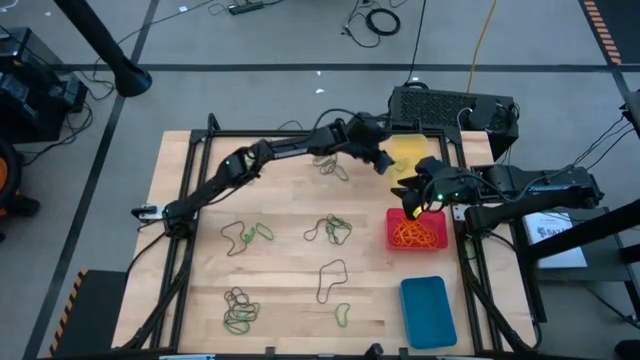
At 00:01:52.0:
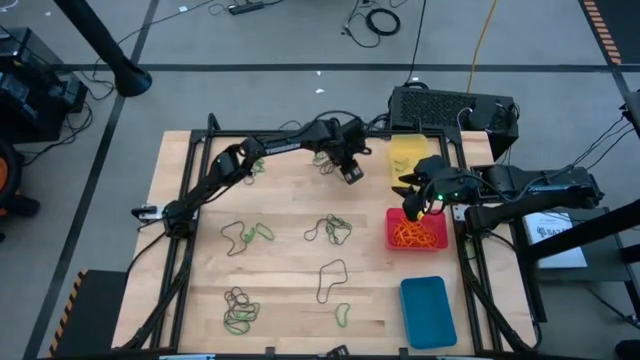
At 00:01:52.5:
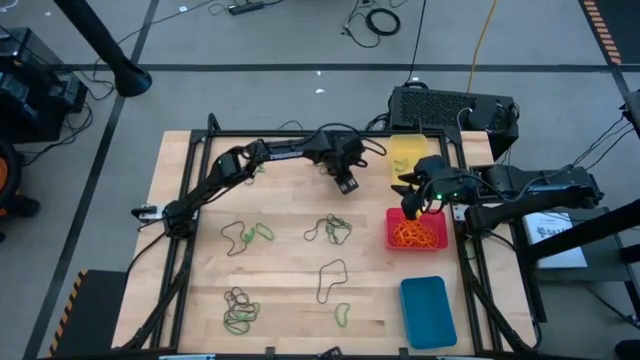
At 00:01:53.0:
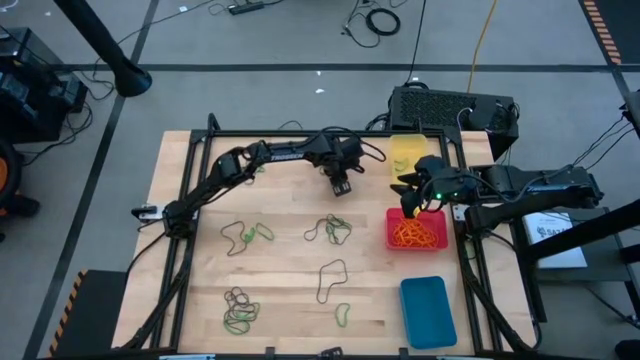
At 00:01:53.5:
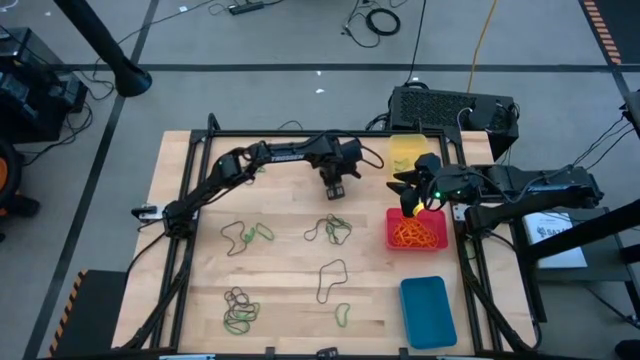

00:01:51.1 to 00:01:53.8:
Task: Sort rubber bands into baskets
Put the green rubber band into the yellow bin

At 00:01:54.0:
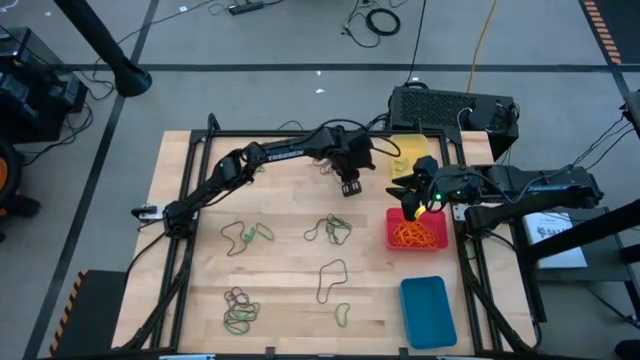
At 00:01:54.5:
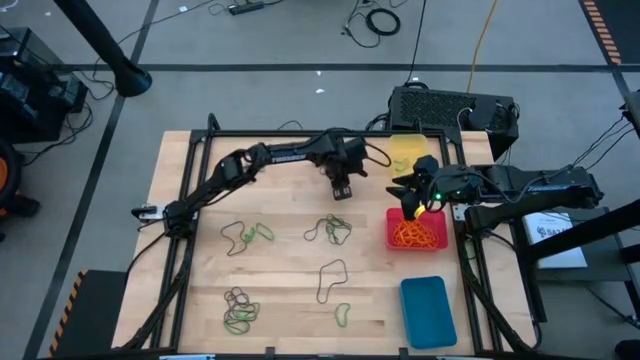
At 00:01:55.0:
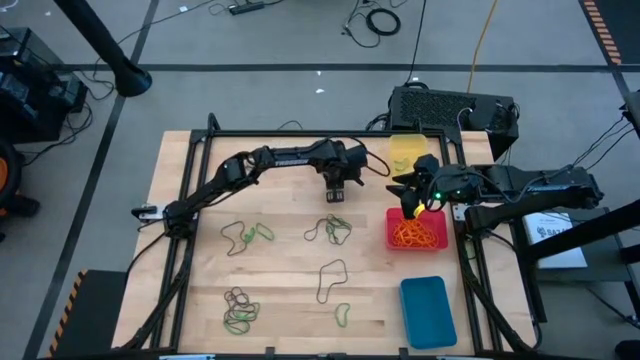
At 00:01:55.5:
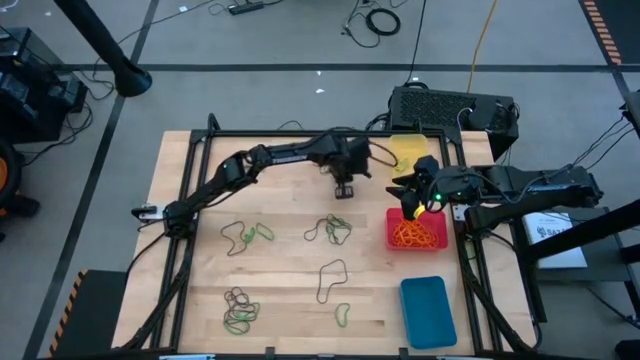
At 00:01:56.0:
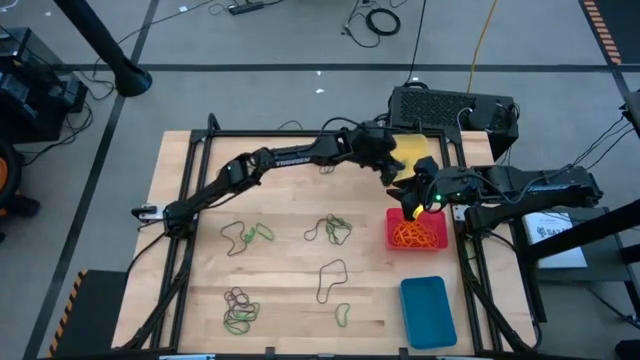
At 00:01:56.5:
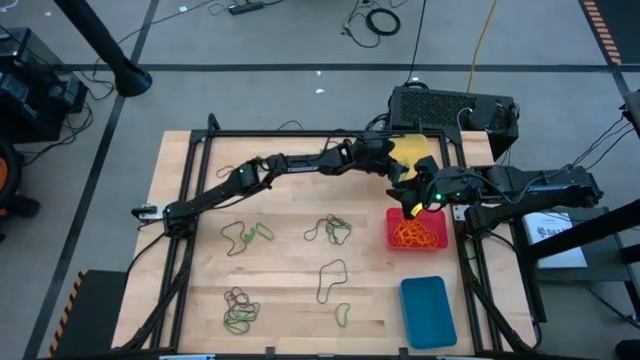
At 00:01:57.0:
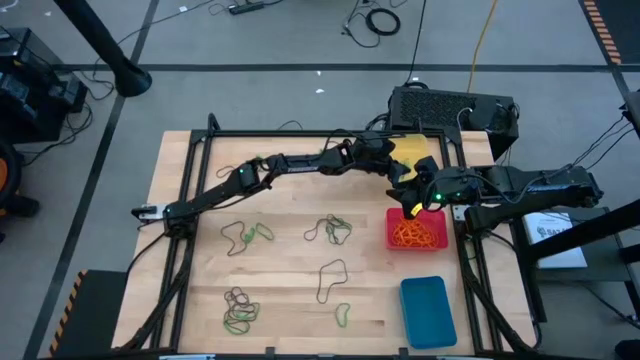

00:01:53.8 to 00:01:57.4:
Put the green rubber band into the yellow bin

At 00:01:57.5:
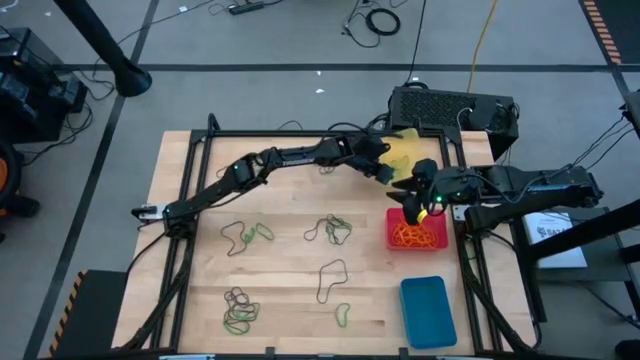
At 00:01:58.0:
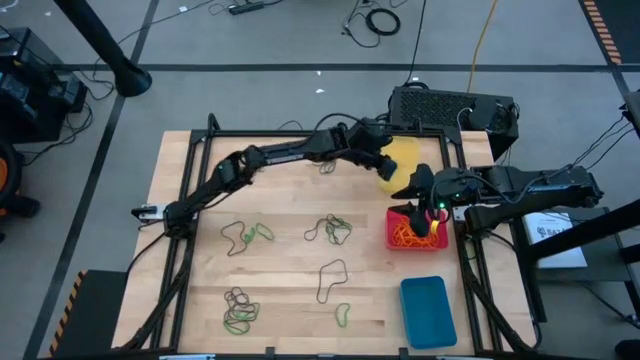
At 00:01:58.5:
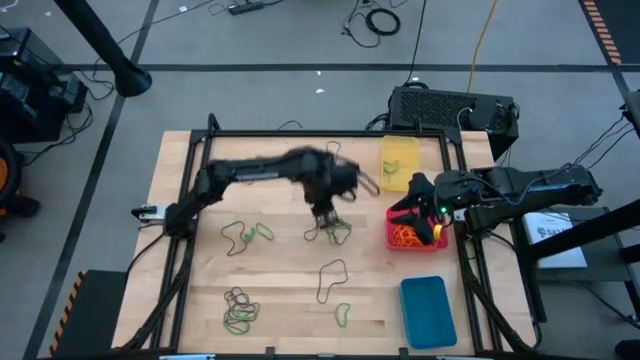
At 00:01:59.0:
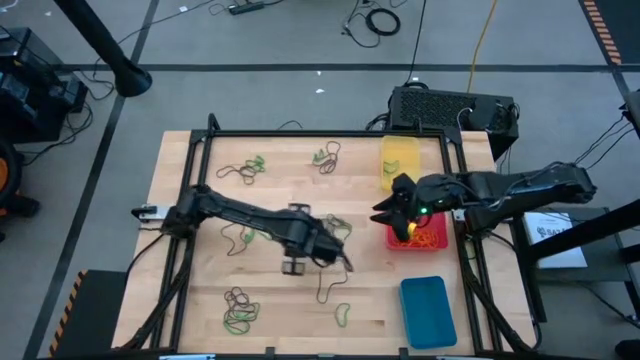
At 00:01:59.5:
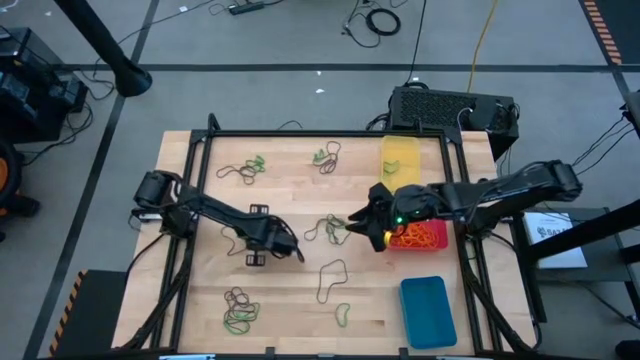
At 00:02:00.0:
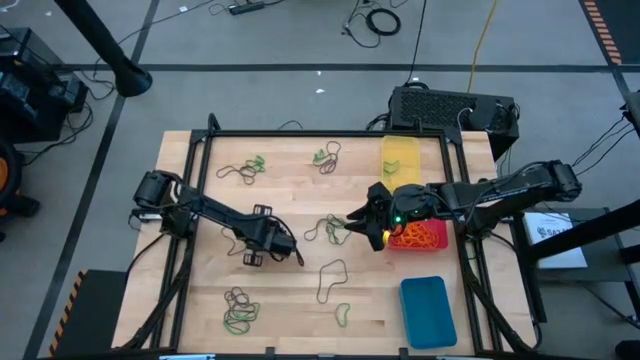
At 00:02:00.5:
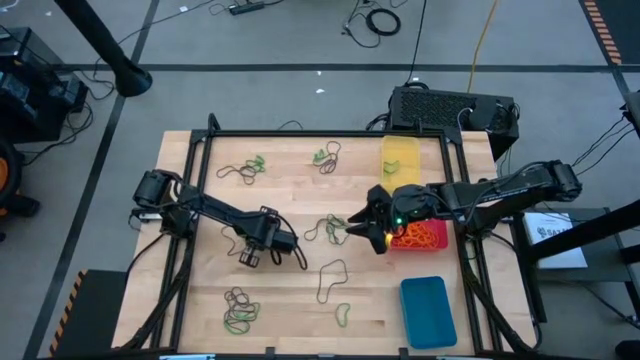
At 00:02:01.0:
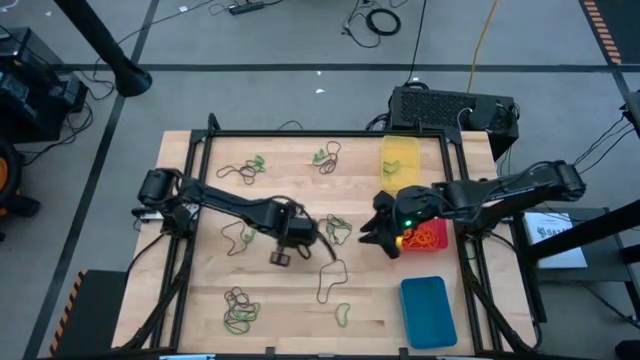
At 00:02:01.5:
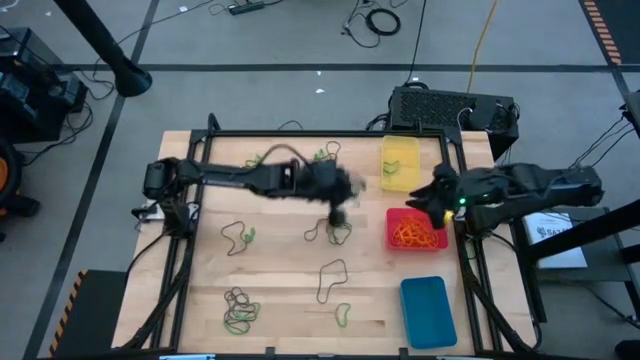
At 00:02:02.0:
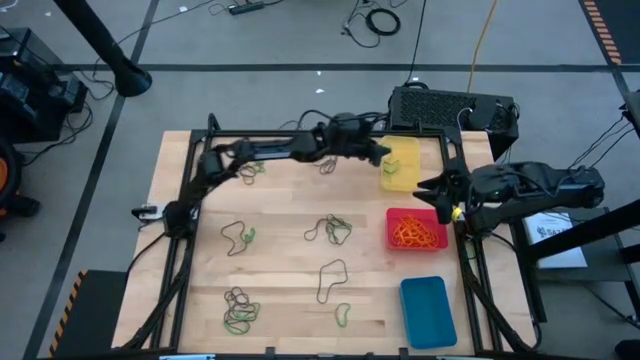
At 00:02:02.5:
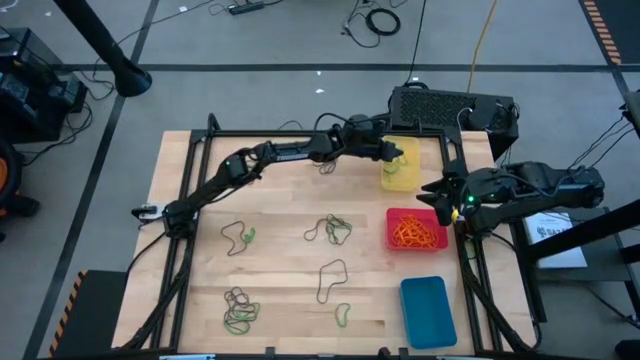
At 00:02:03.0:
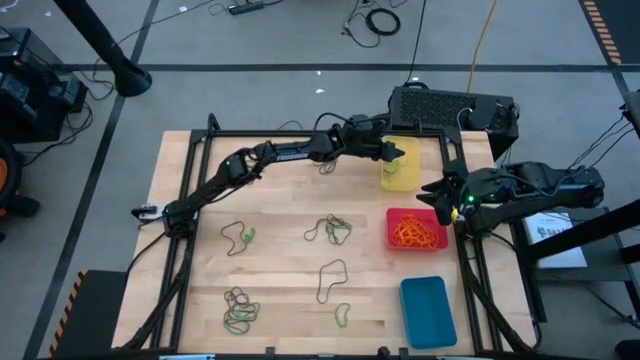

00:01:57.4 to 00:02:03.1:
Put the green rubber band into the yellow bin

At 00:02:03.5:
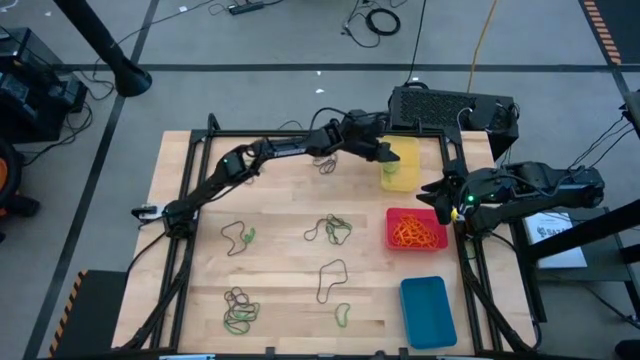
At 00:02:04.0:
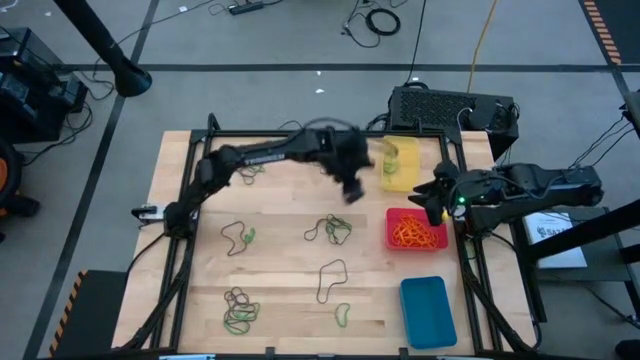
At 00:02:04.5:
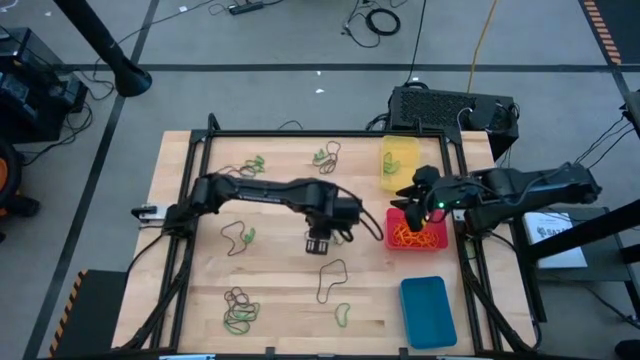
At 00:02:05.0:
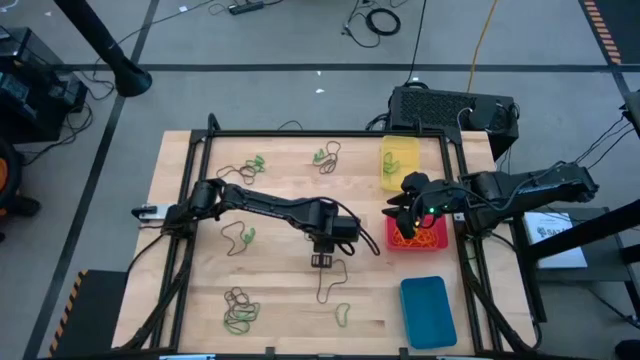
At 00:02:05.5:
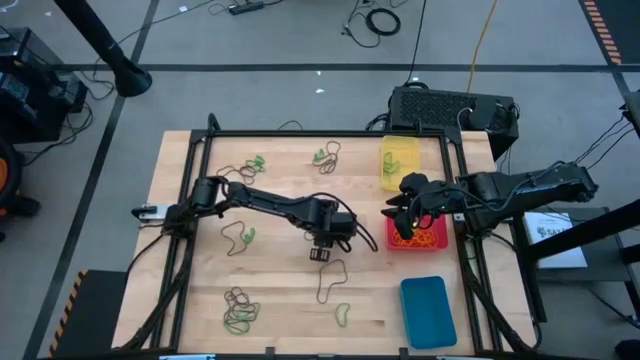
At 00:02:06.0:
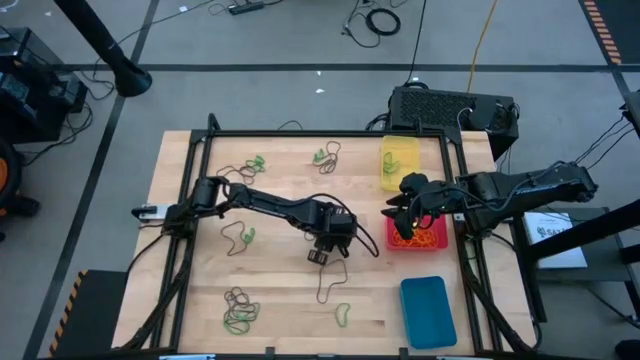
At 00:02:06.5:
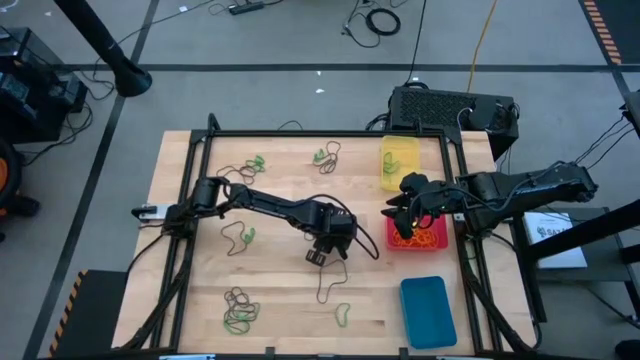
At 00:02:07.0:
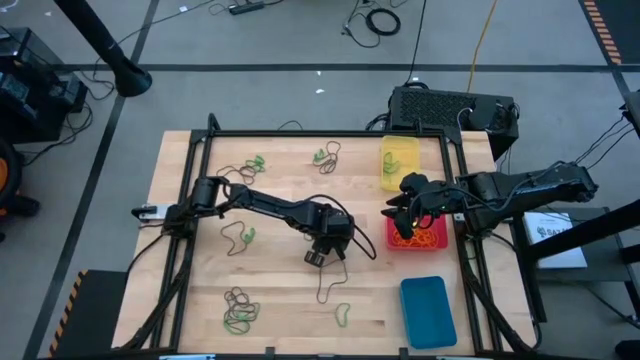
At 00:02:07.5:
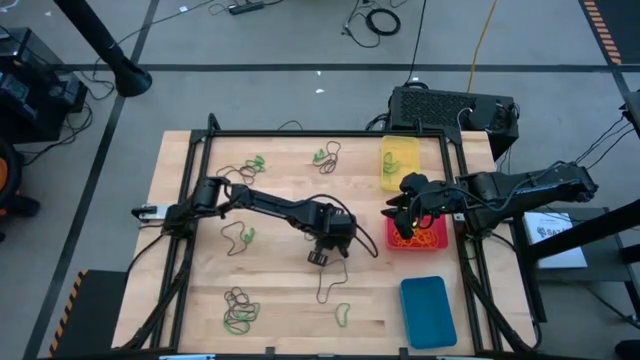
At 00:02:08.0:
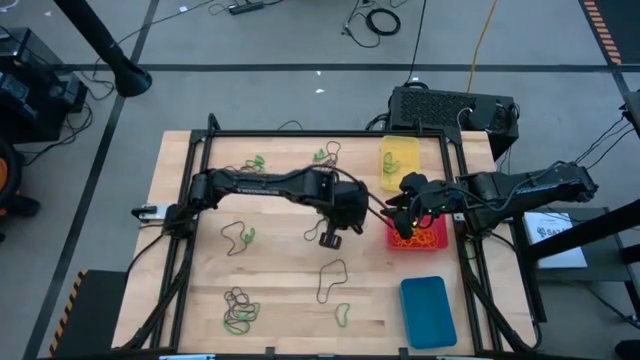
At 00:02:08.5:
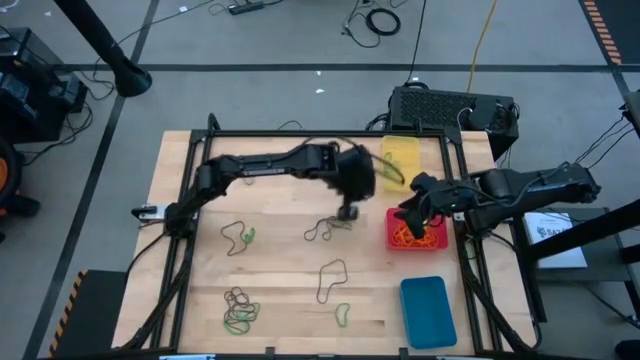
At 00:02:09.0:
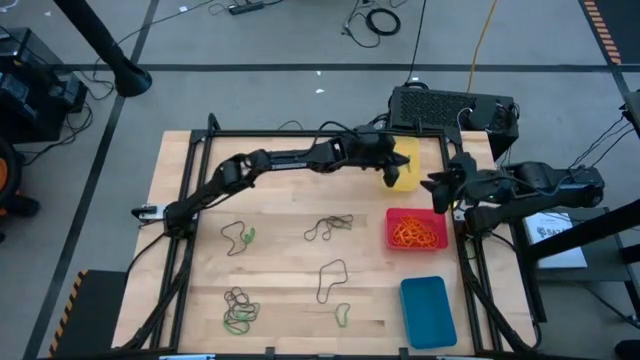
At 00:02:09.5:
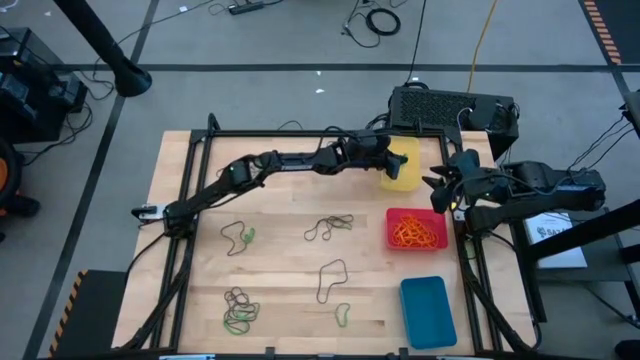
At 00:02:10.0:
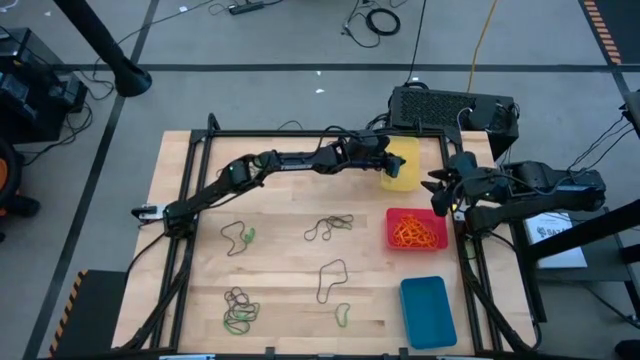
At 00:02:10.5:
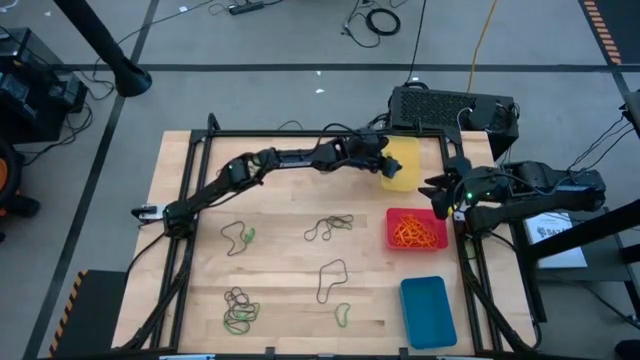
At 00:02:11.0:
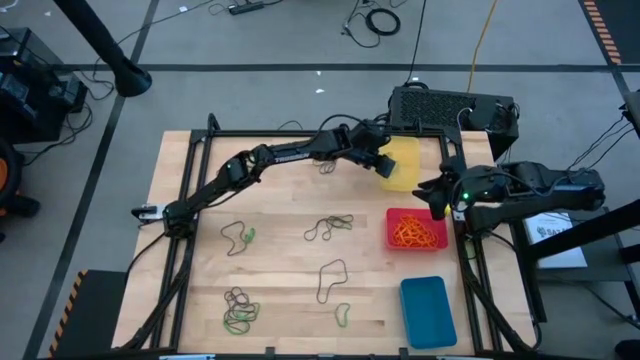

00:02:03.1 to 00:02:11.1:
Put the green rubber band into the yellow bin

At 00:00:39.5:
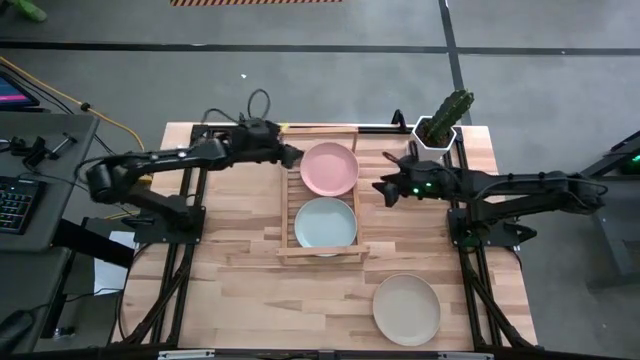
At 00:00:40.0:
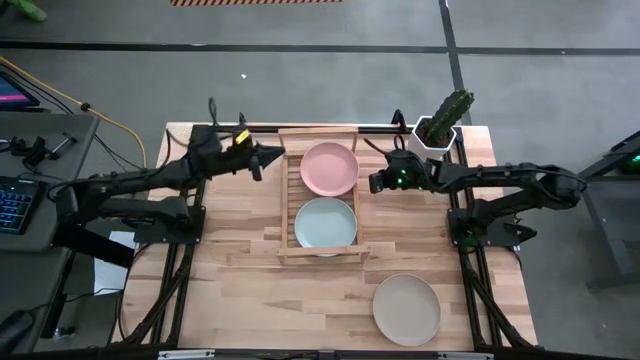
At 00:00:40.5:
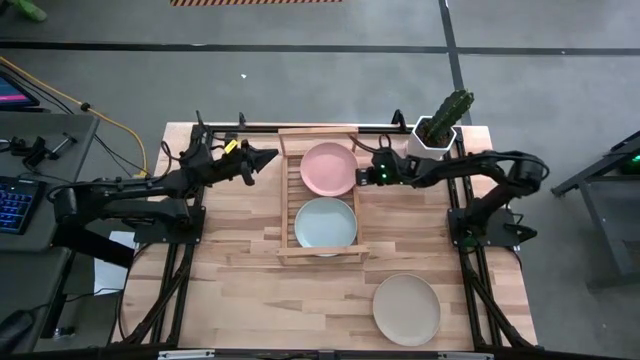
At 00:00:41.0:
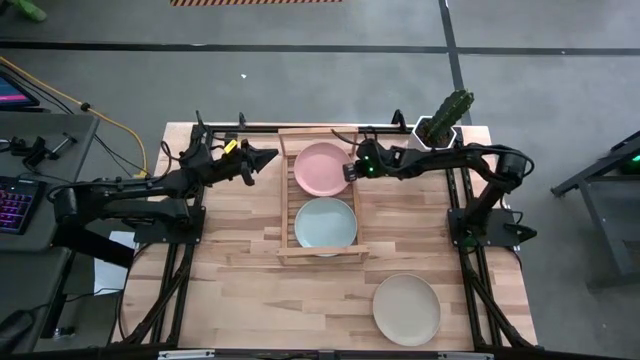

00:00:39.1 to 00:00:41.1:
Task: Place and stack plates onto a shelf
Adjust the stacked pink plate on the shelf
